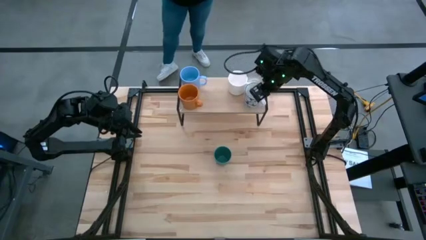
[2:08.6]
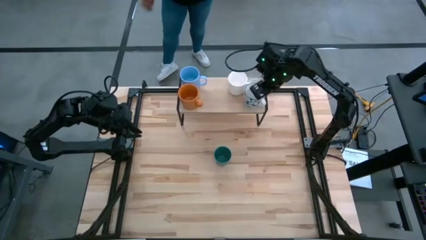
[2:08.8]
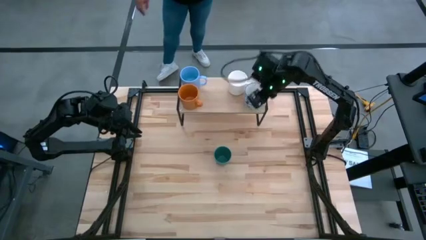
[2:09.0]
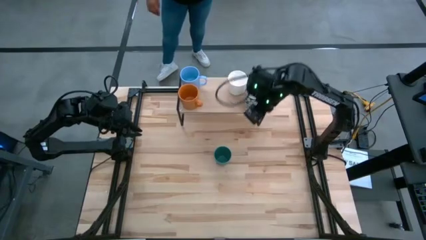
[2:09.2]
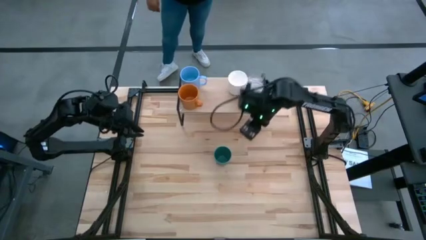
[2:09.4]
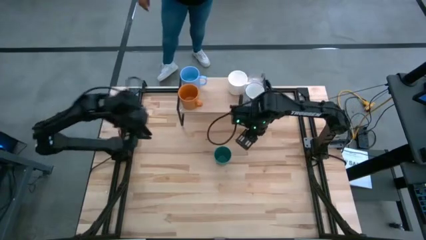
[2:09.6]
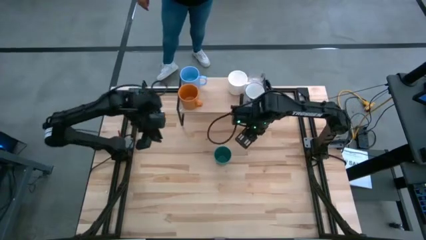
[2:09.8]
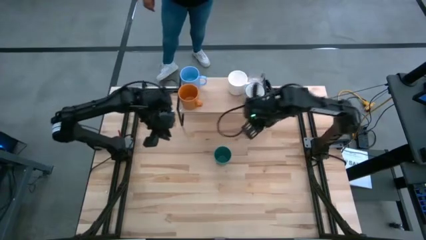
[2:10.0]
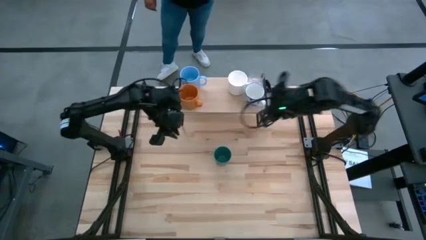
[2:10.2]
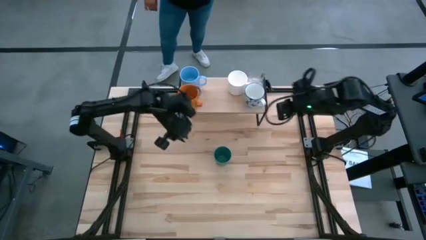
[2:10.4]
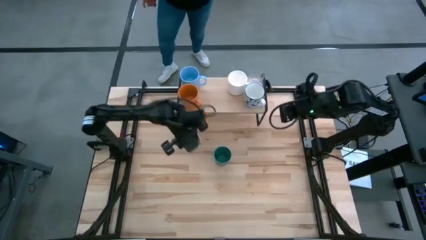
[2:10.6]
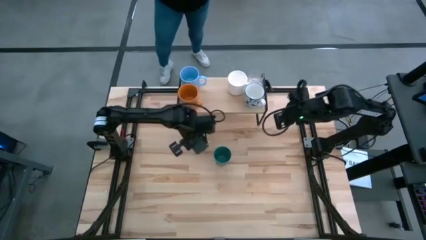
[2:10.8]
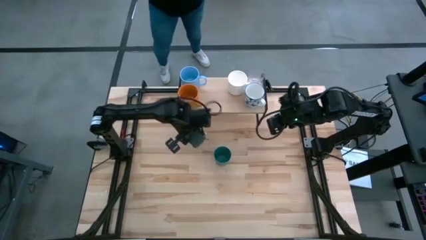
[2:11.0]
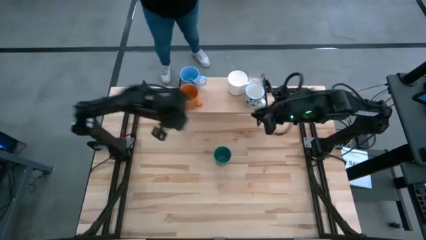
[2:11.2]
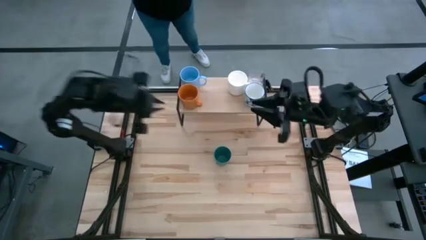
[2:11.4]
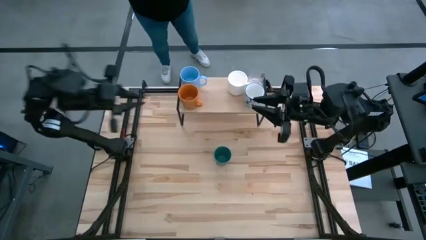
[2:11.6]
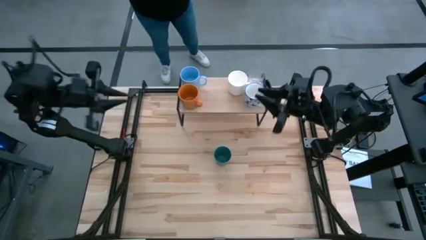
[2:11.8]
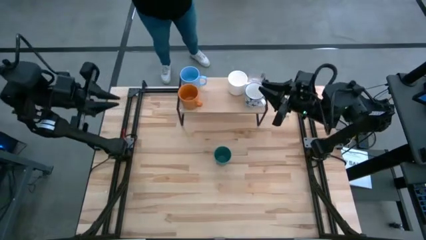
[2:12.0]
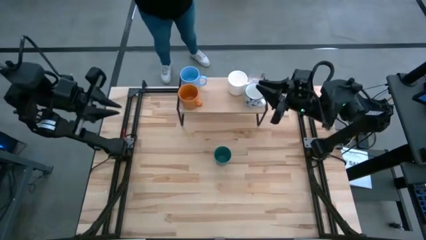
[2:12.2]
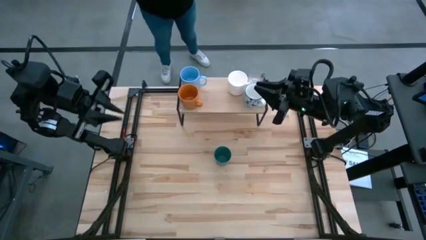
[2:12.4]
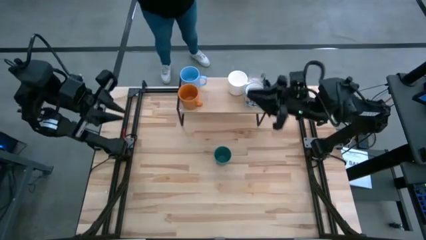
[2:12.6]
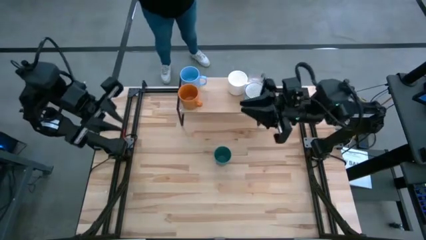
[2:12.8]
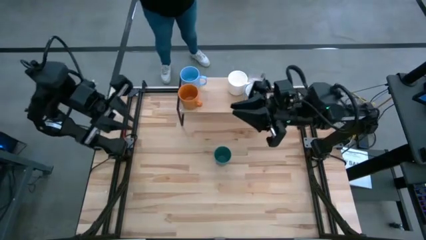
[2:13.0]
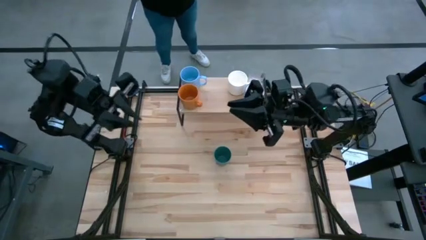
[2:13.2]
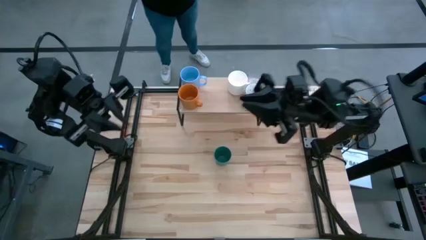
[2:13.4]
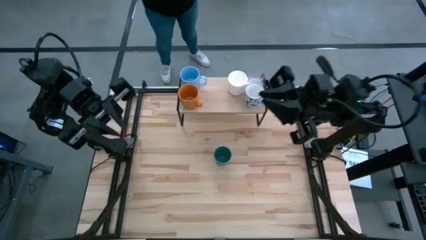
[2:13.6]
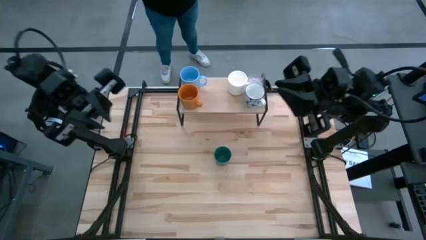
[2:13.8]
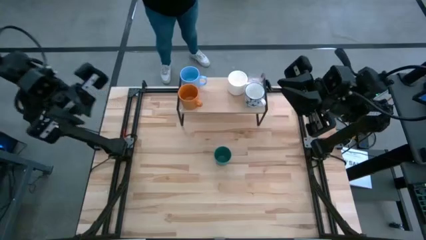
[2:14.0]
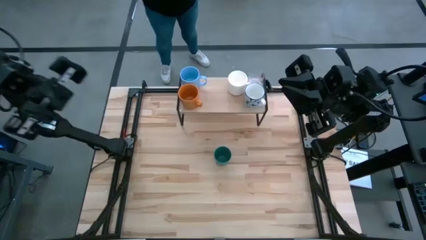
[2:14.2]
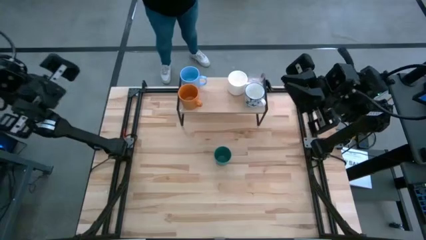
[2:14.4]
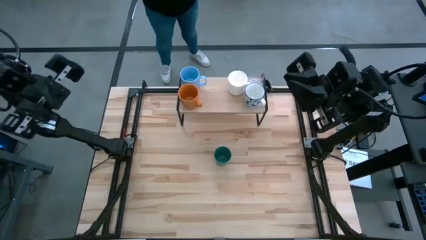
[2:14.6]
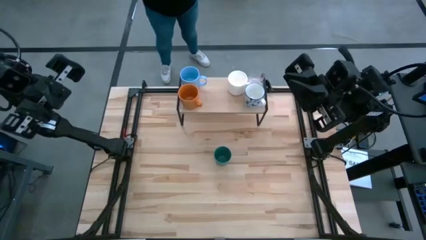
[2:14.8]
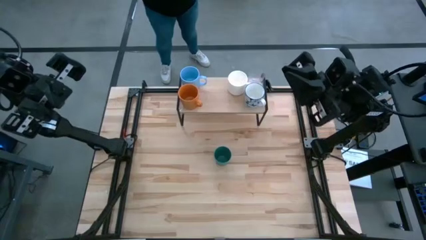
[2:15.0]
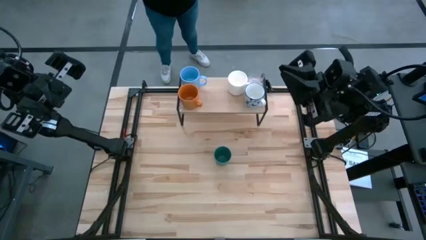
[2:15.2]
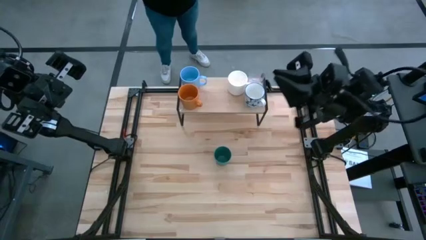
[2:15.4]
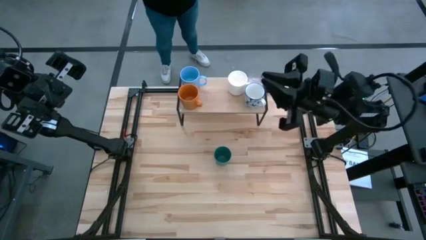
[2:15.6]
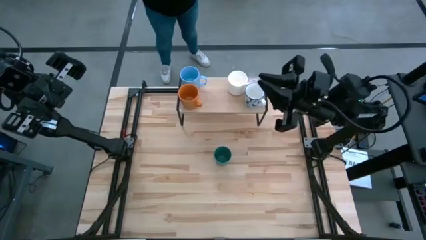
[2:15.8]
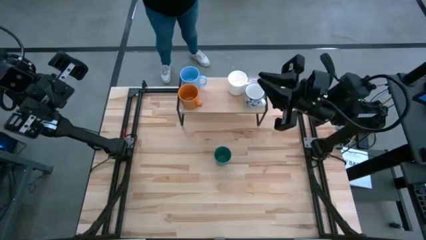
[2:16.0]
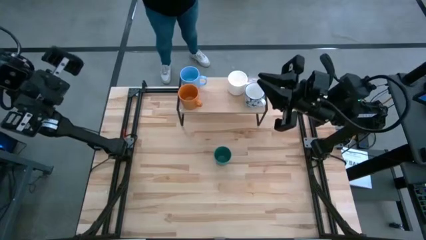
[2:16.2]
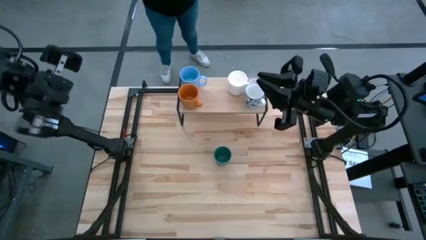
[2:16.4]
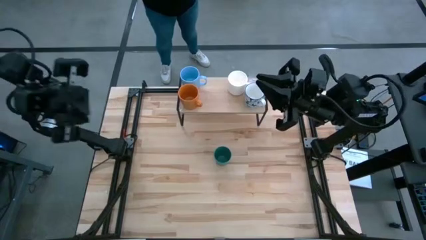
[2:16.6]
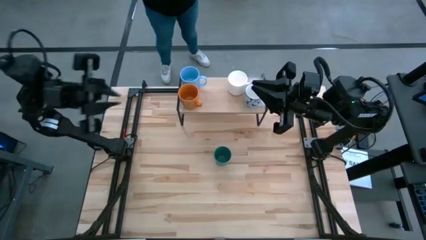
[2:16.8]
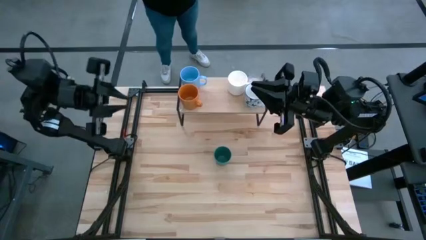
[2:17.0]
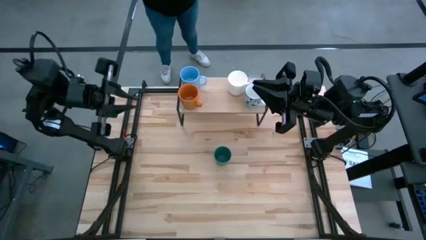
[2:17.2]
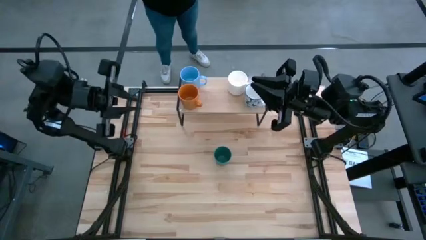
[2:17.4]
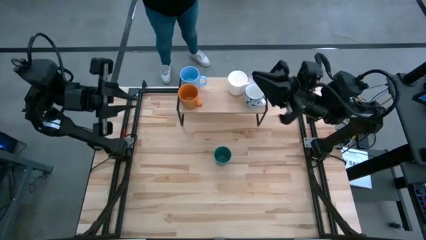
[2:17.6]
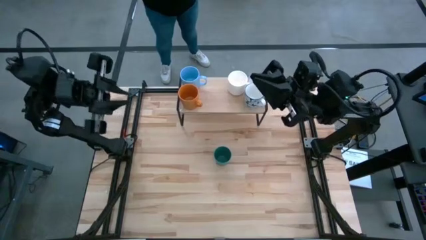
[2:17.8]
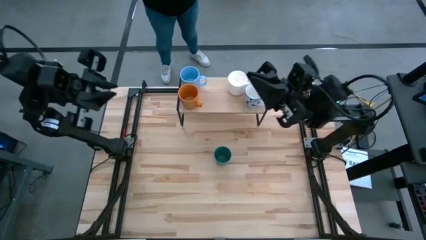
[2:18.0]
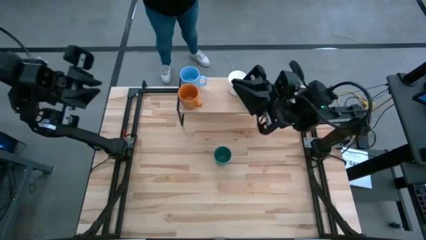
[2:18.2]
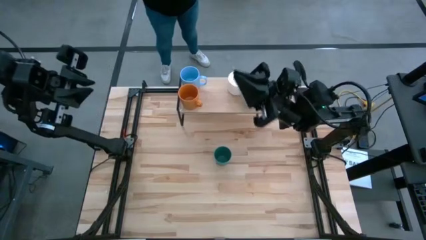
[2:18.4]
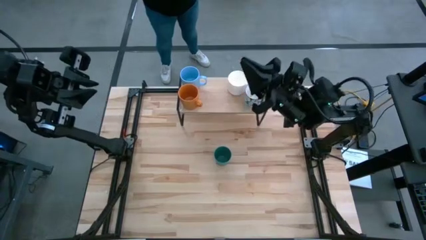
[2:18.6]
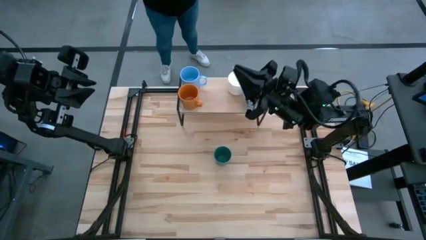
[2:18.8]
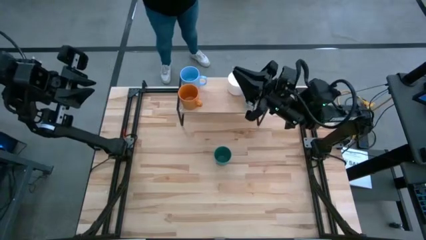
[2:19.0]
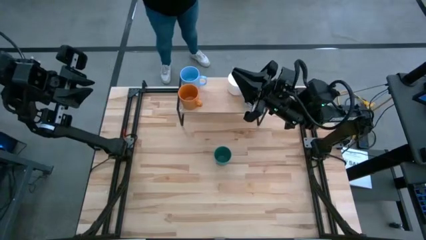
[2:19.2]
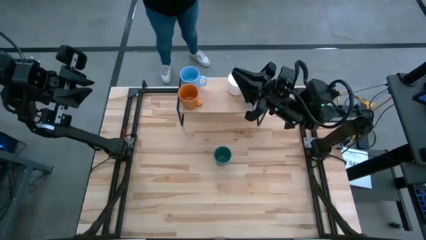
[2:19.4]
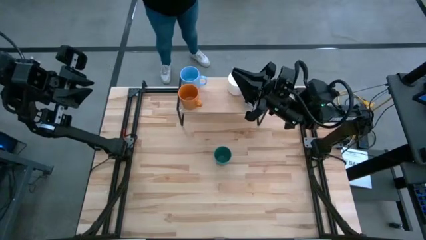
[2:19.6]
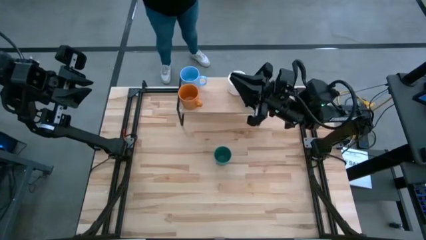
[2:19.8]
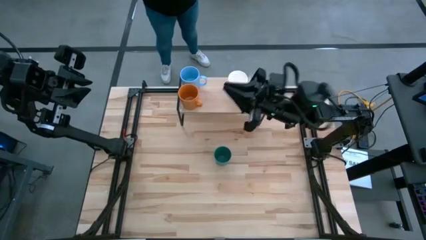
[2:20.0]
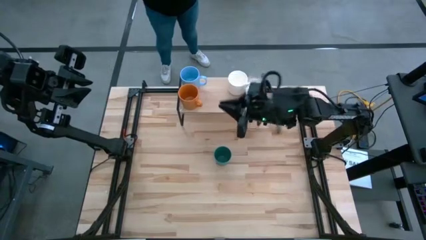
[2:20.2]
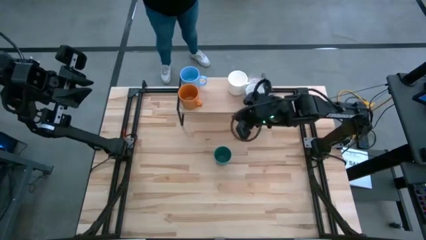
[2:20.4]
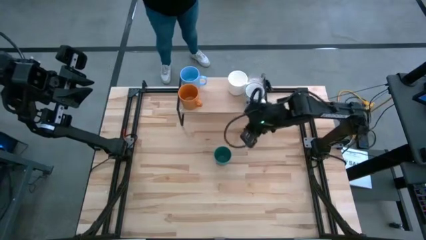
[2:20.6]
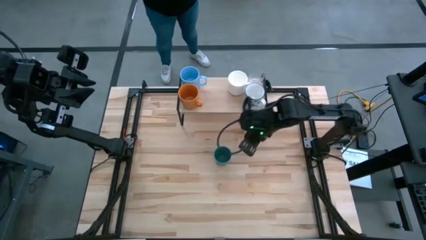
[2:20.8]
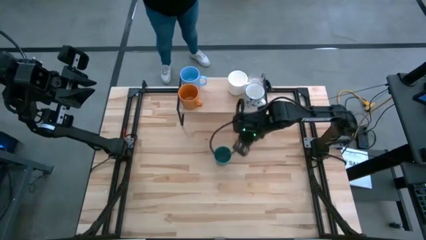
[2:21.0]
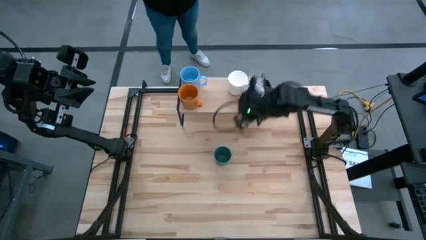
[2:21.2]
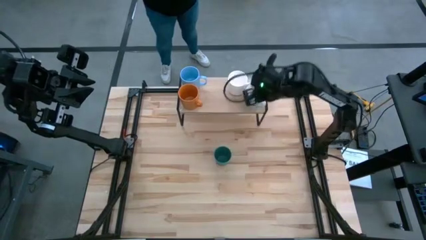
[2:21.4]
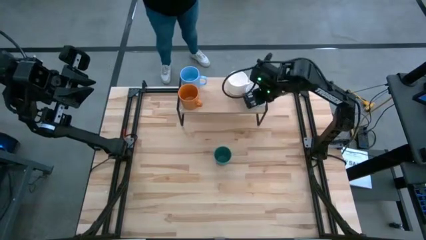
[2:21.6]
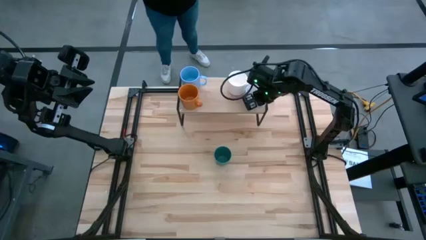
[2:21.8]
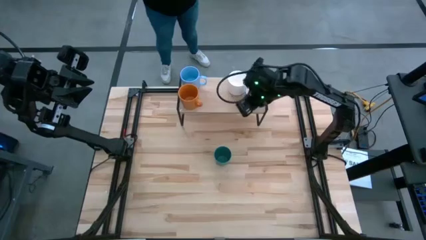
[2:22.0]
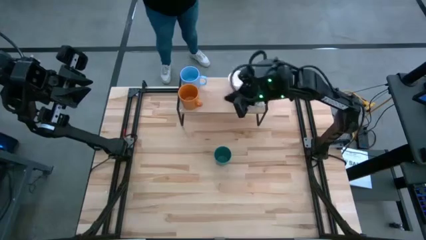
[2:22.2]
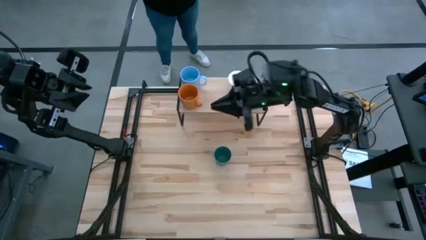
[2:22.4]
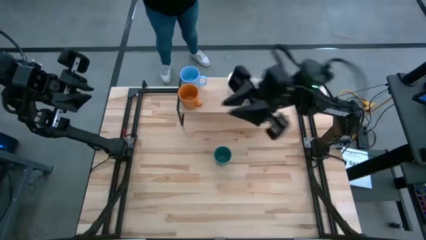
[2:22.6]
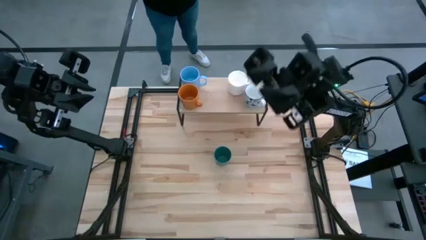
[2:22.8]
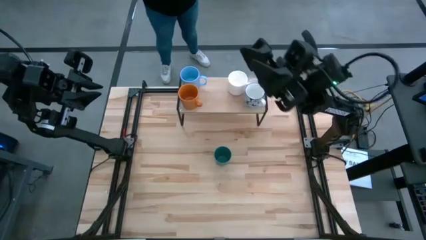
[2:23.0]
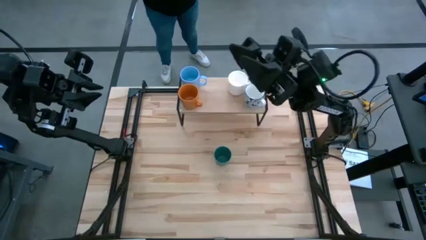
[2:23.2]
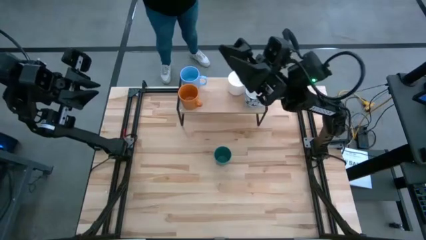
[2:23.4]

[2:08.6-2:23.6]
Task: Stack small to large cups/mugs on shelf
Put the green cup on the shelf
